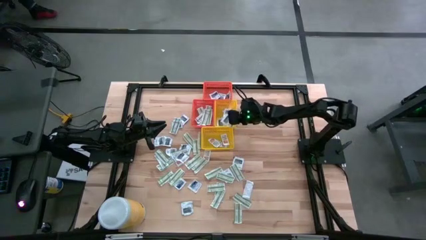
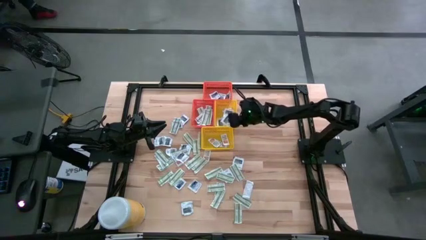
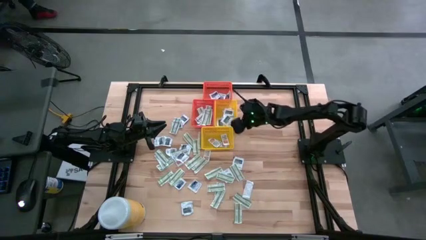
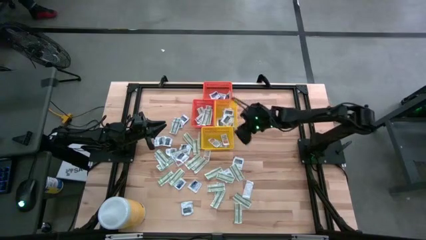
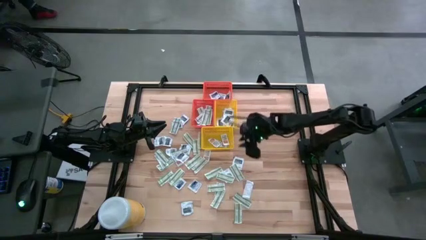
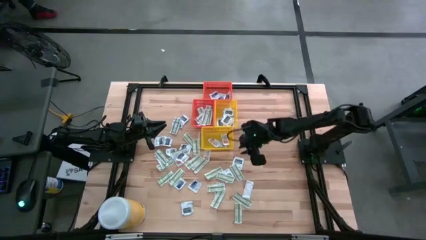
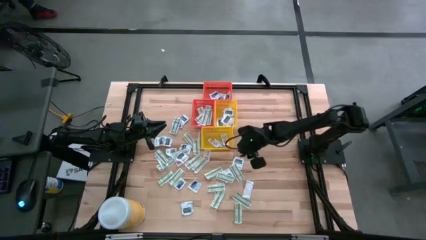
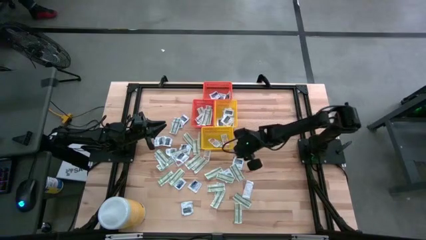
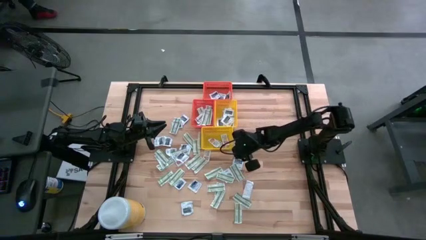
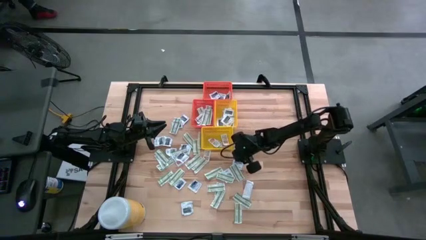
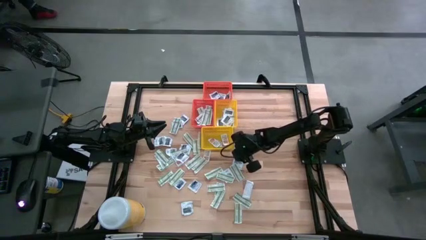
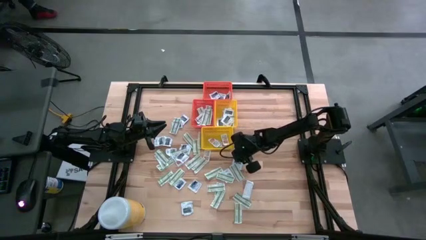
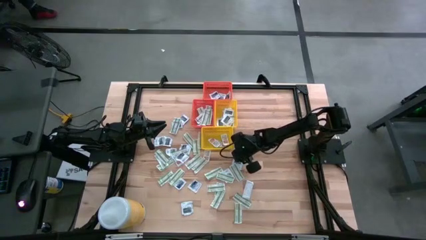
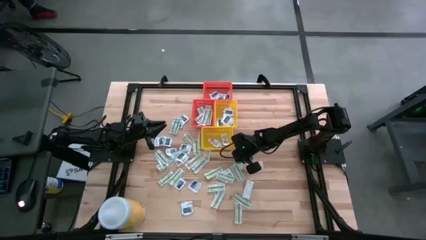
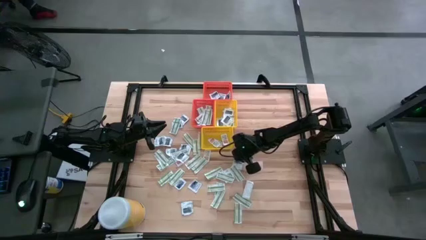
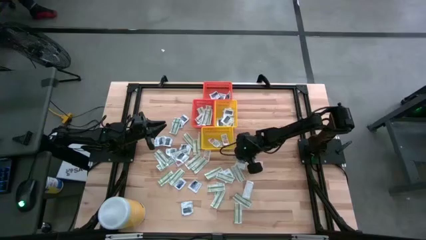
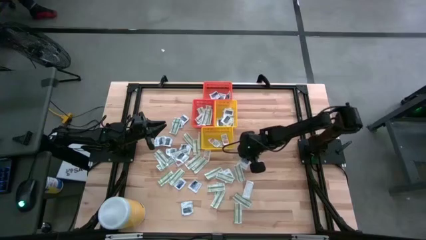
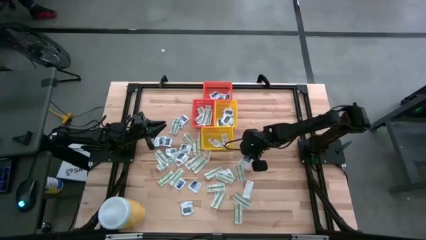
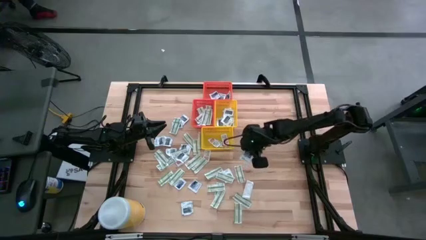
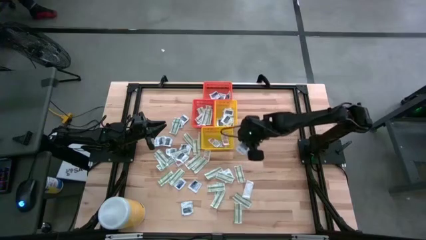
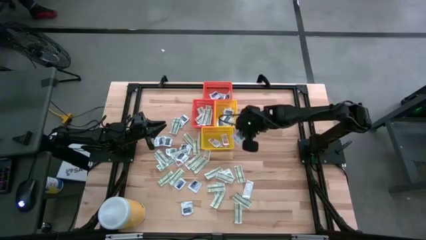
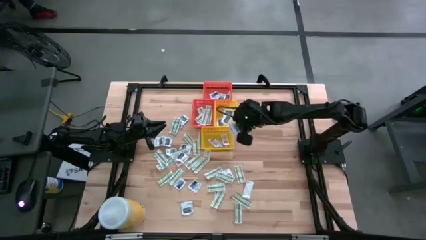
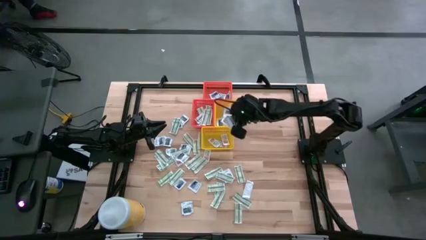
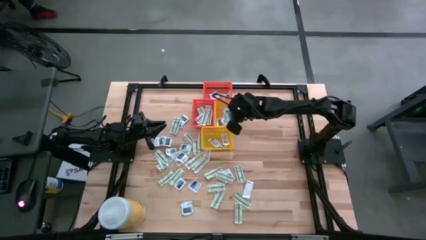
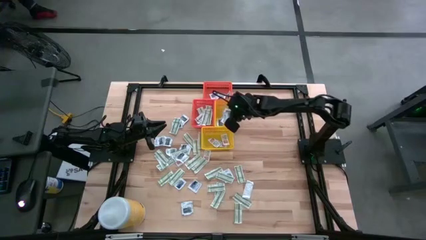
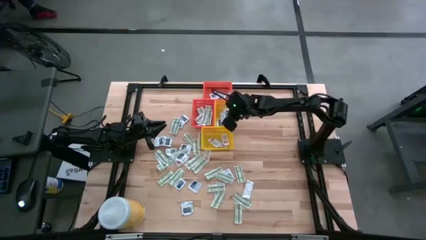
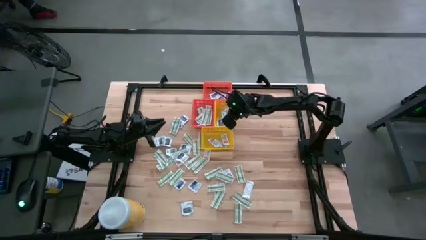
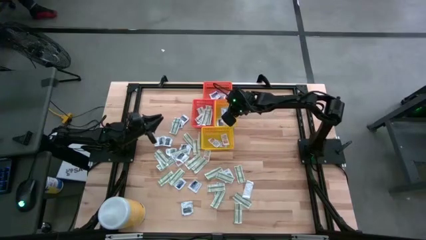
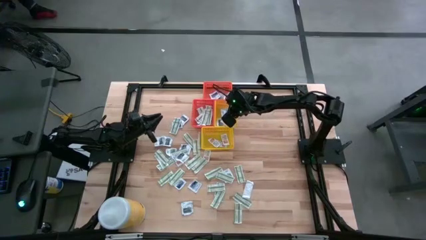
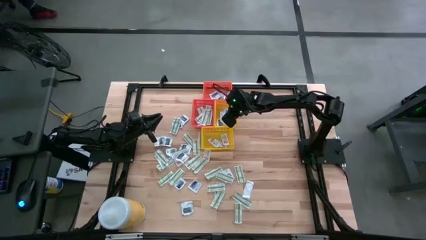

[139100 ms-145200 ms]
Task: Pick & Place First Aid Supplies
Put the towelette pack into the top yellow bin

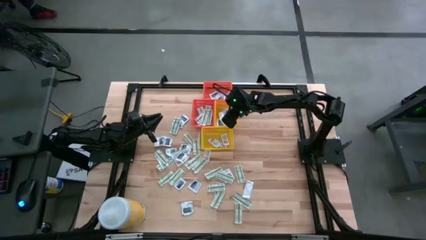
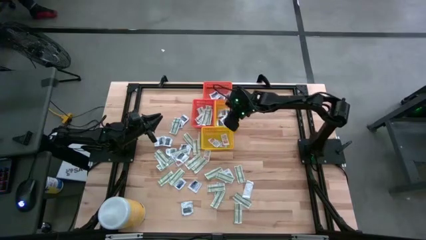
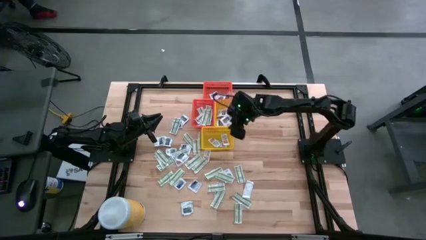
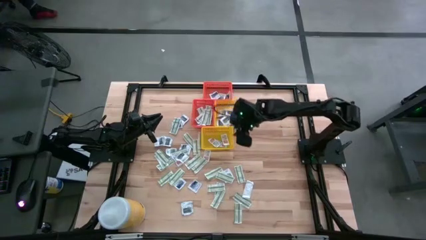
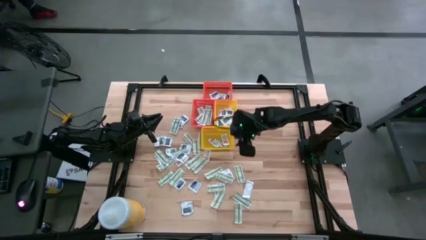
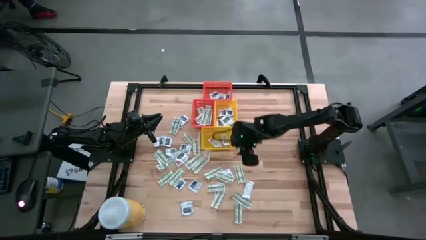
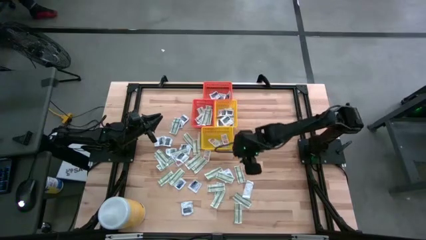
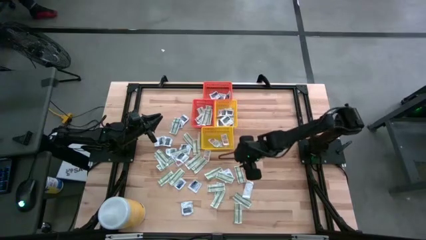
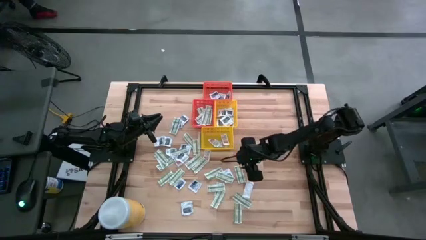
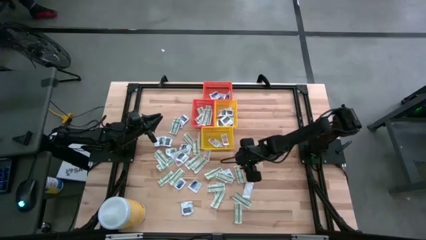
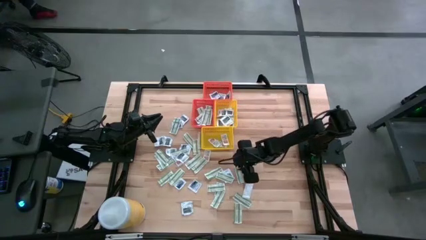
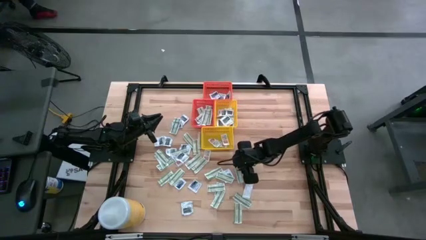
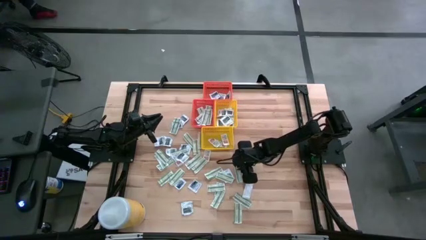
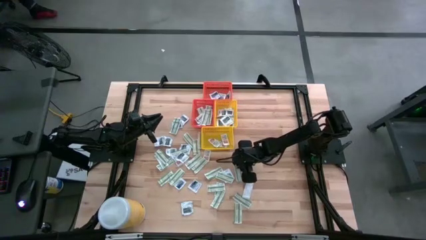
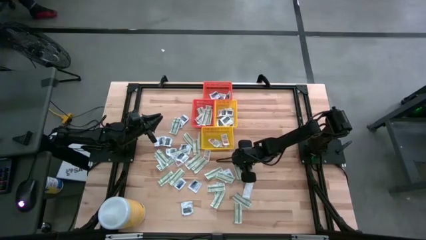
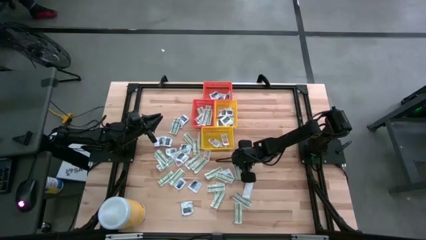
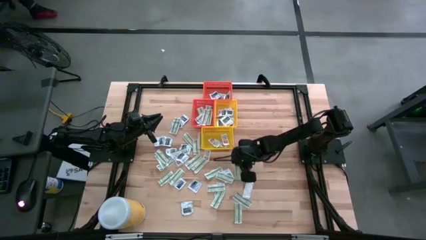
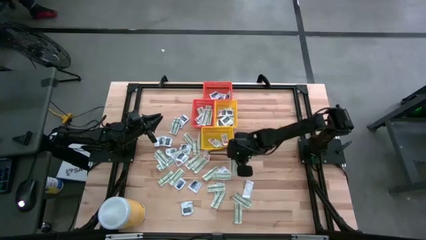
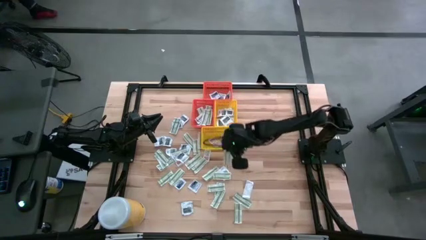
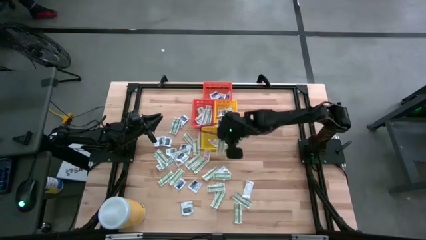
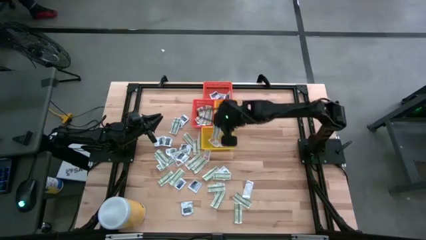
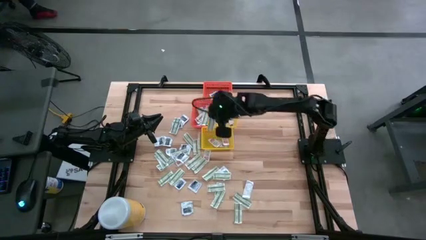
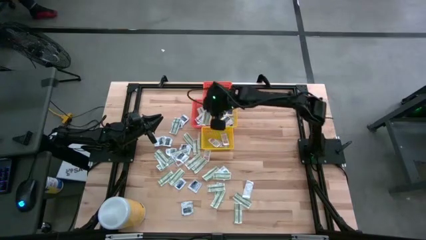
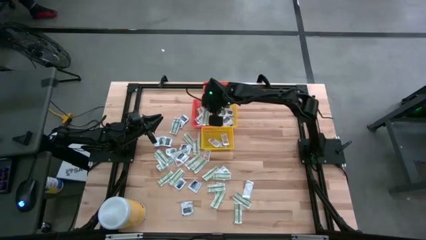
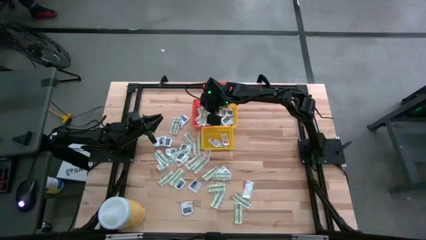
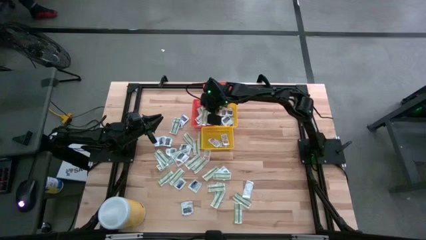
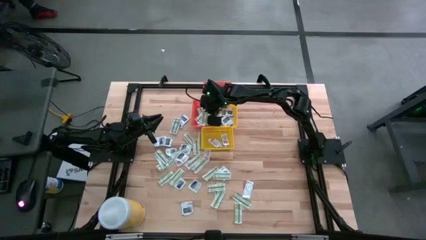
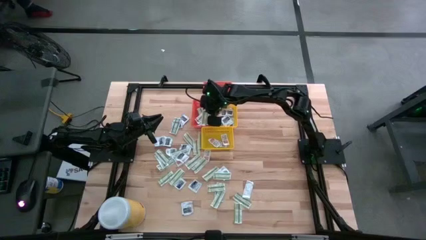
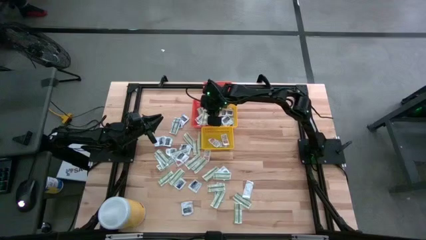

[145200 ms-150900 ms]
Put the bandage into the bottom orange bin

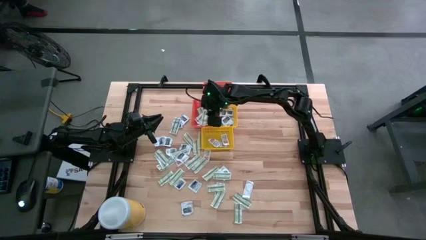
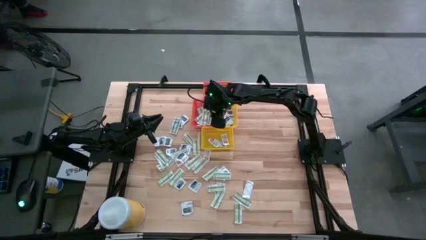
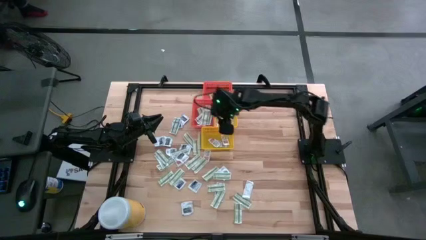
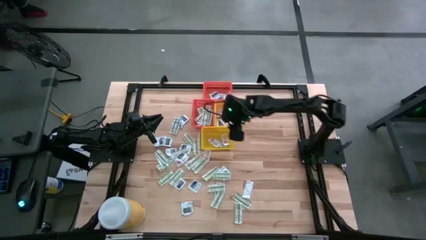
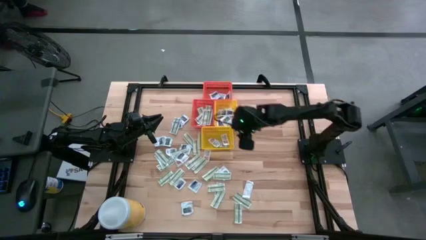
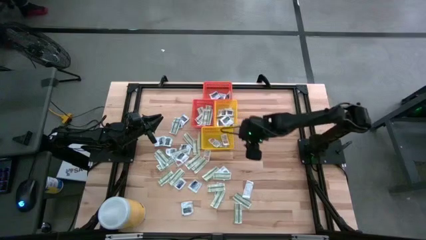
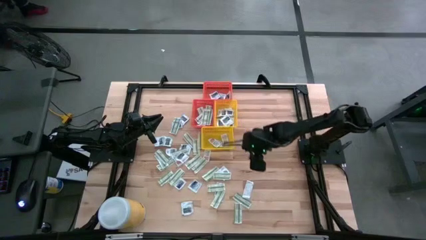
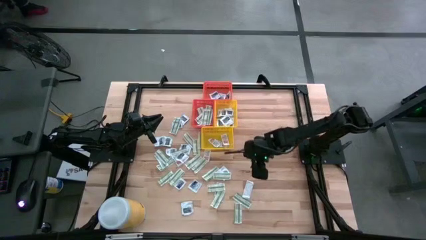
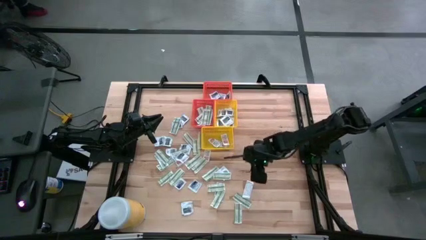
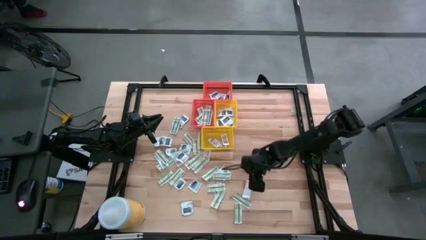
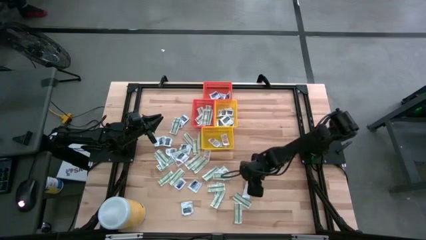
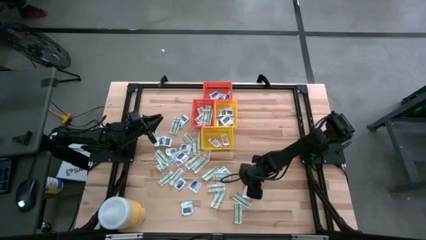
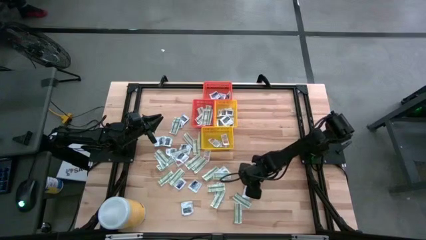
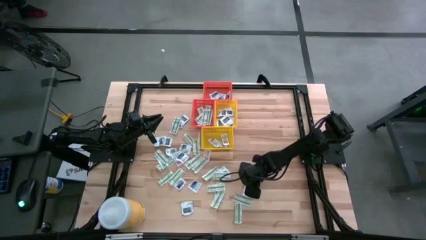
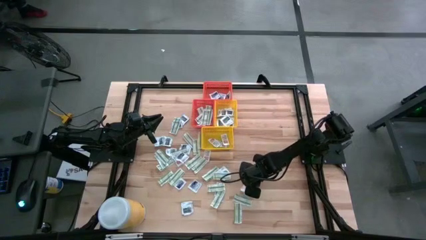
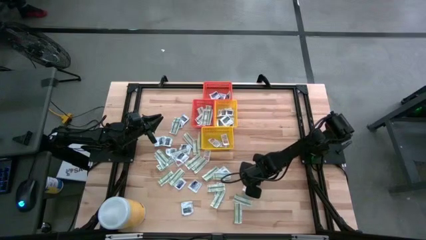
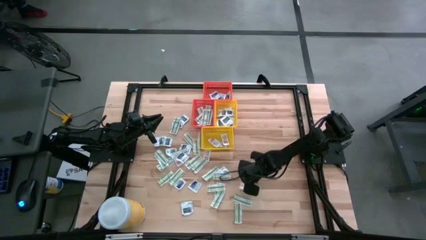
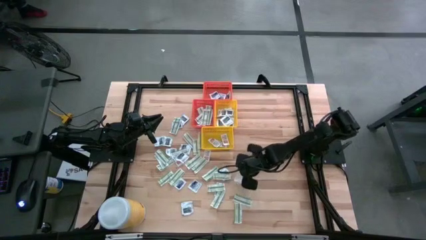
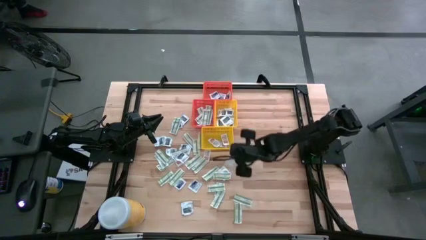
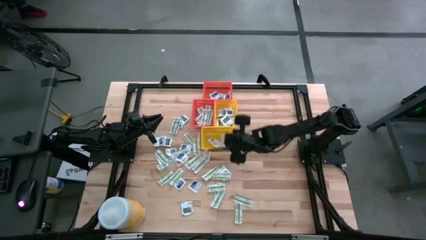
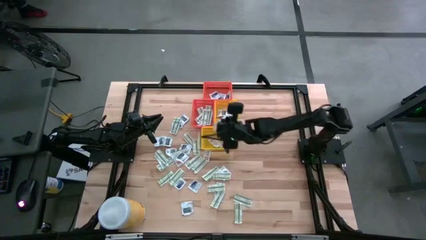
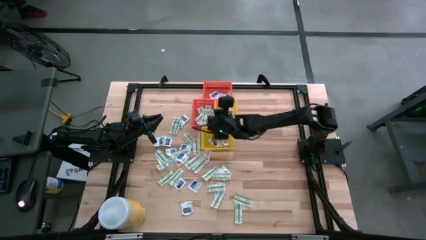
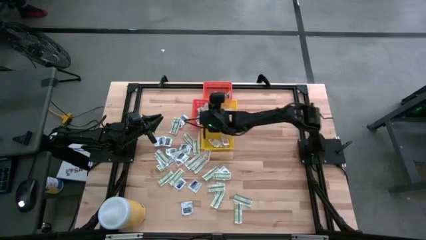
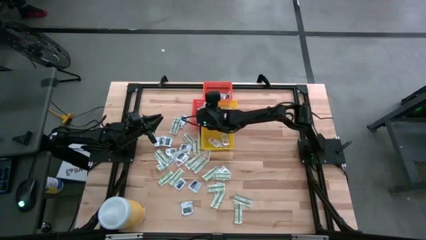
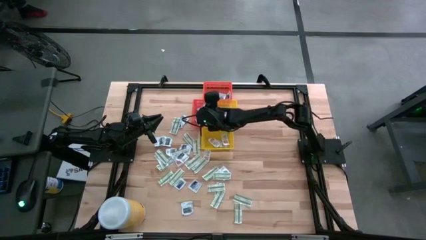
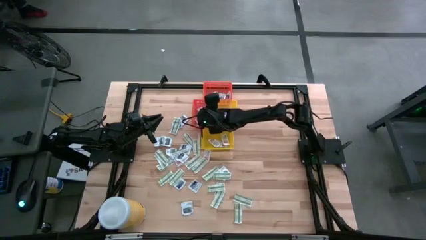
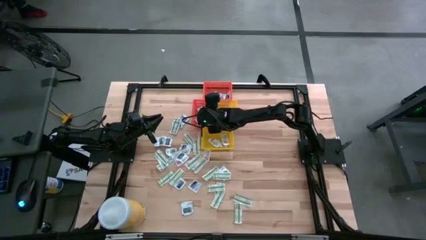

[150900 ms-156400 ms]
Put the bandage into the bottom orange bin
